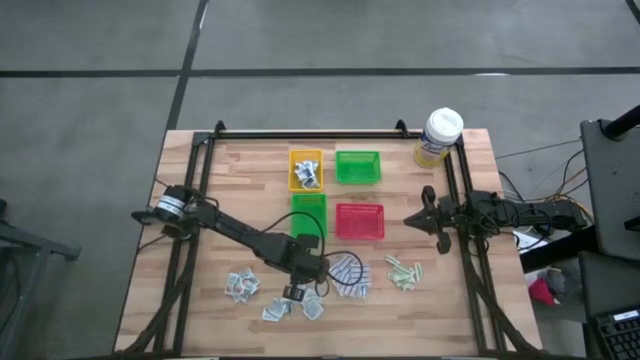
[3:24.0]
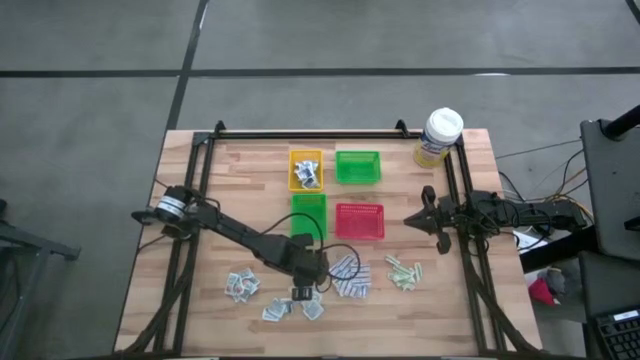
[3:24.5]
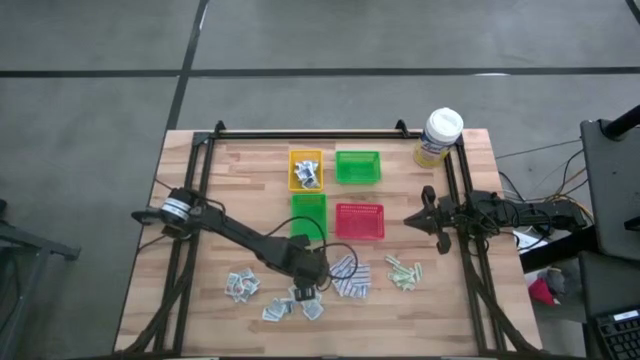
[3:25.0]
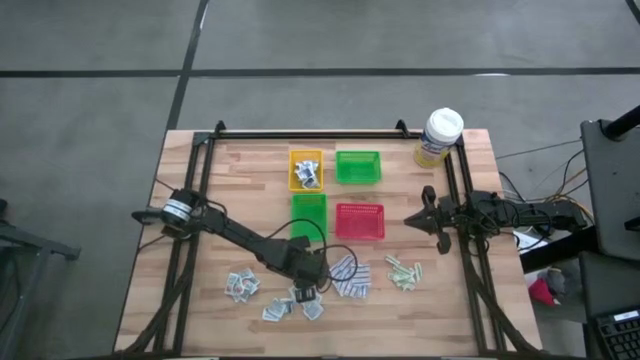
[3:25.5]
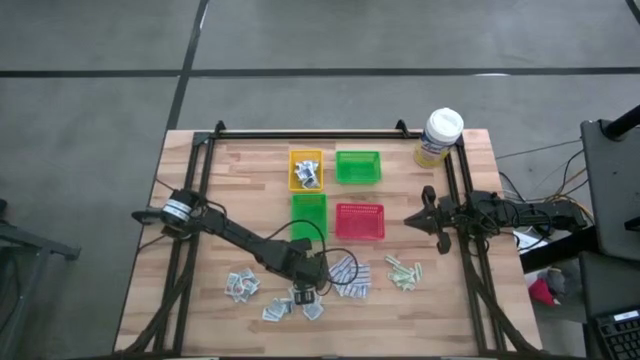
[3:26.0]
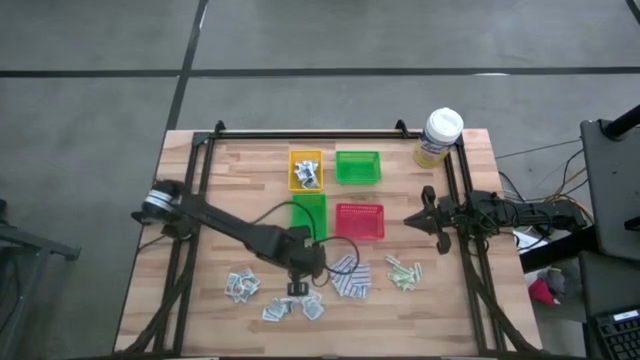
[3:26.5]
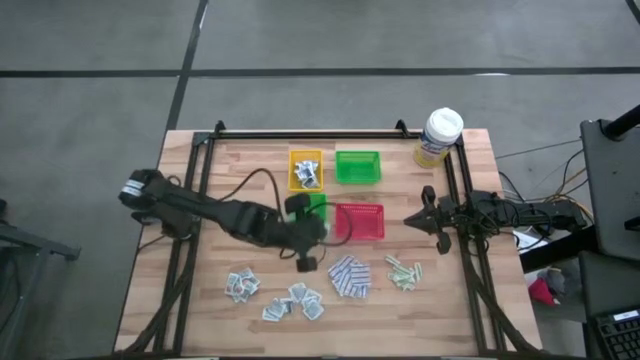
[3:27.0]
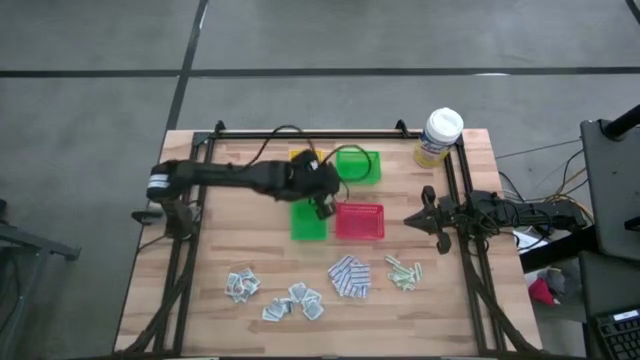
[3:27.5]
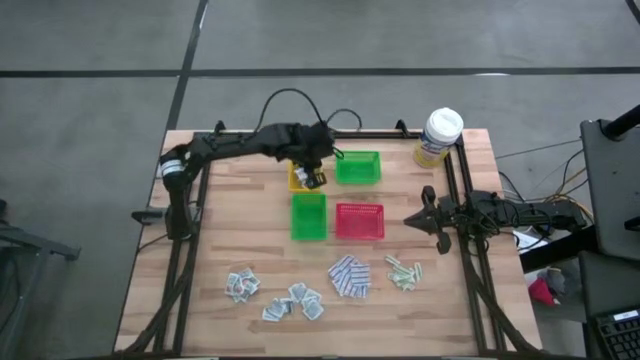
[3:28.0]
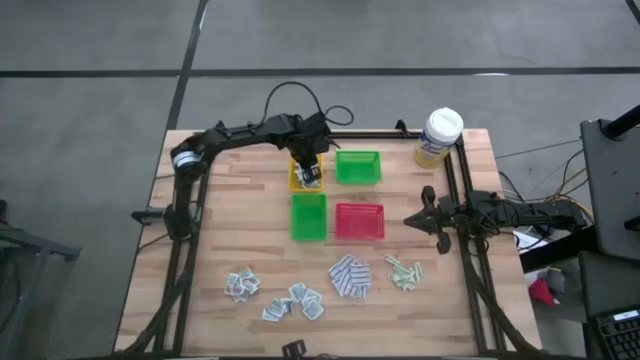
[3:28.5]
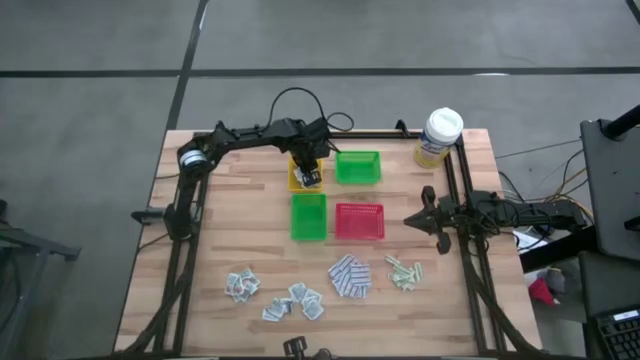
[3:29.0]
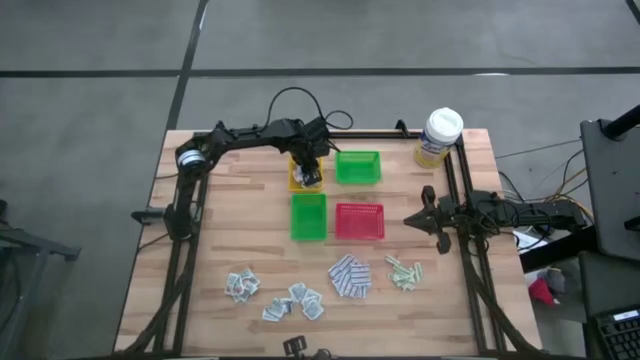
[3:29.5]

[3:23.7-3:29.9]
Task: Pick & Place First Aid Supplies
Put the blue alcohol pad into the yellow bin

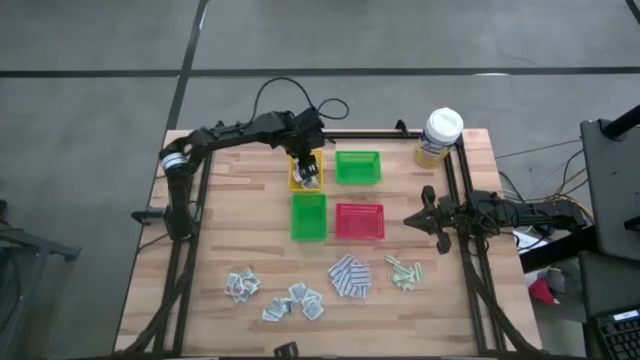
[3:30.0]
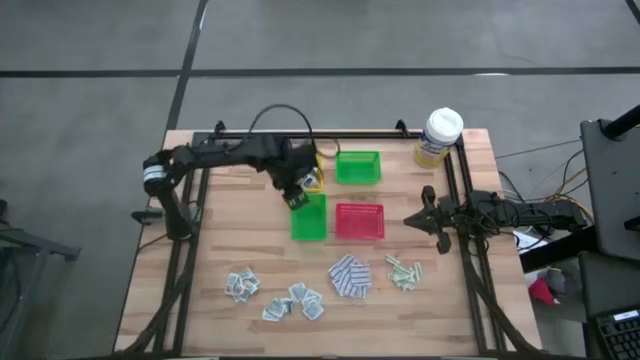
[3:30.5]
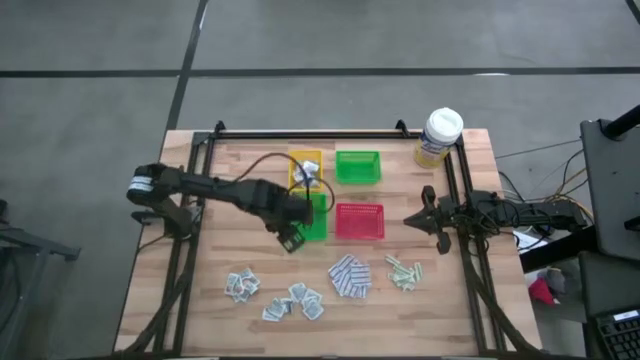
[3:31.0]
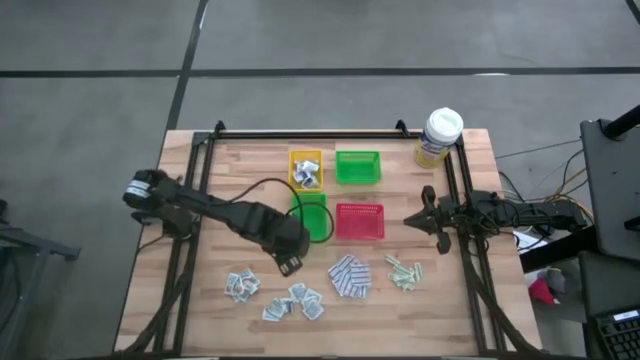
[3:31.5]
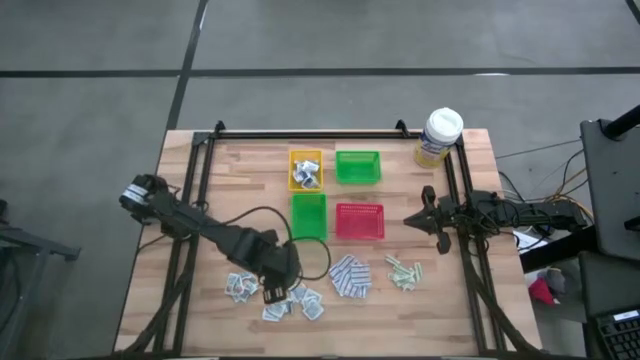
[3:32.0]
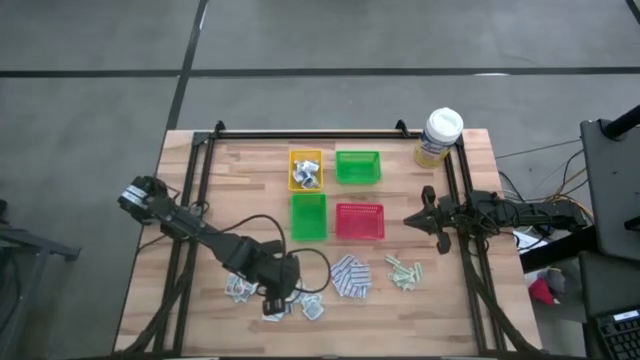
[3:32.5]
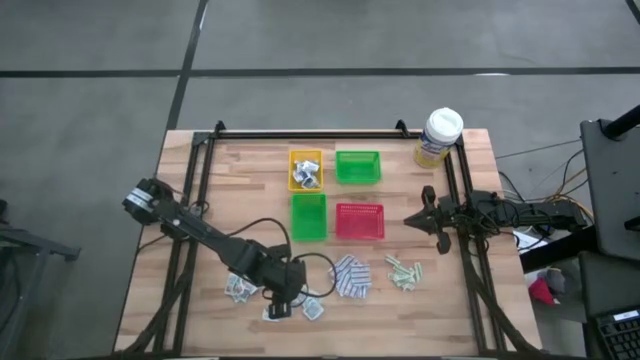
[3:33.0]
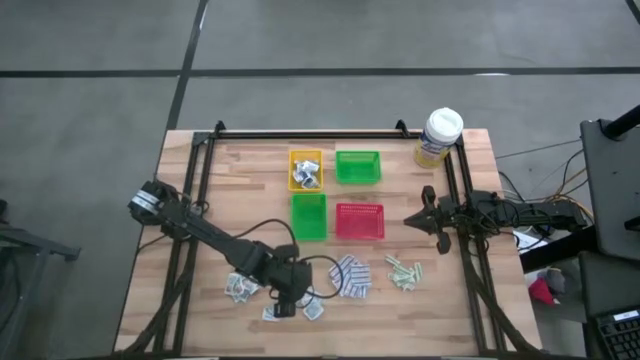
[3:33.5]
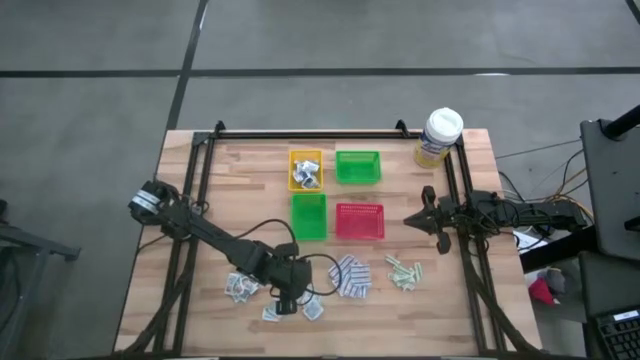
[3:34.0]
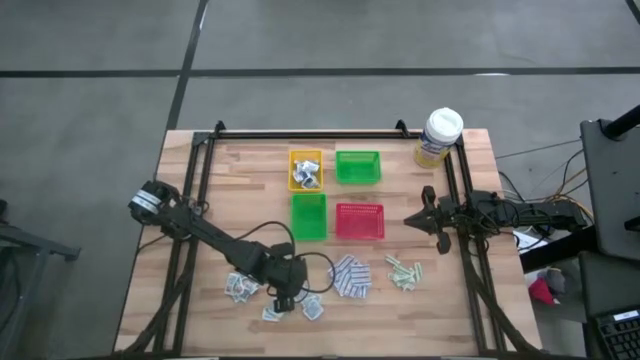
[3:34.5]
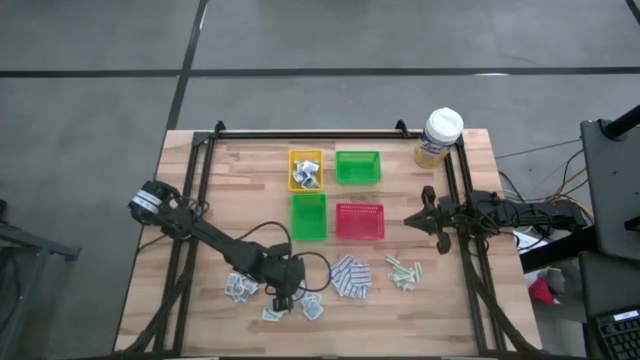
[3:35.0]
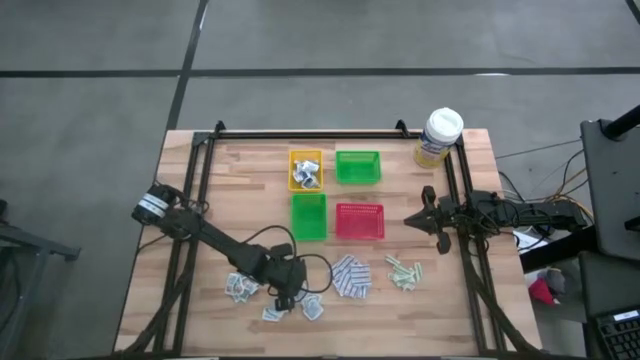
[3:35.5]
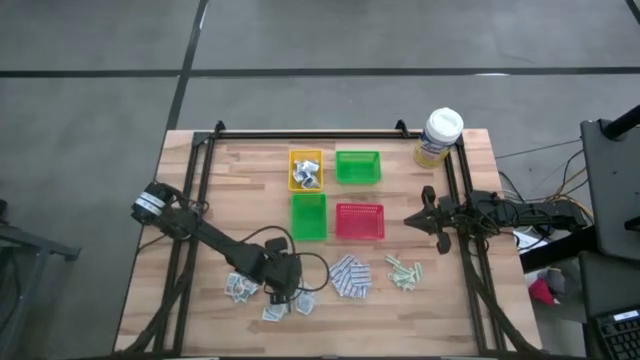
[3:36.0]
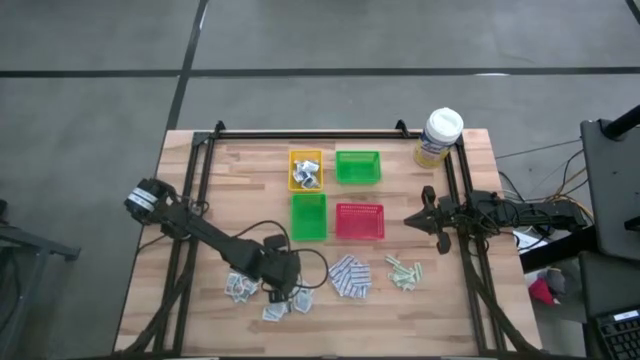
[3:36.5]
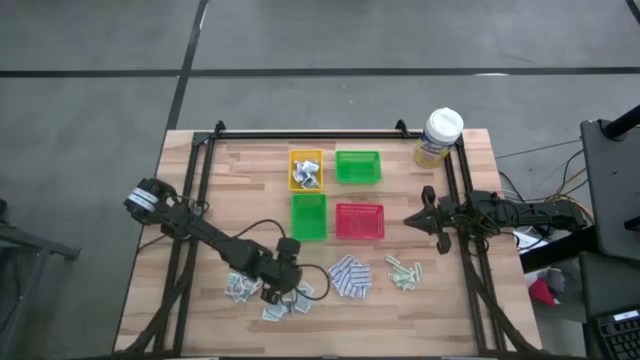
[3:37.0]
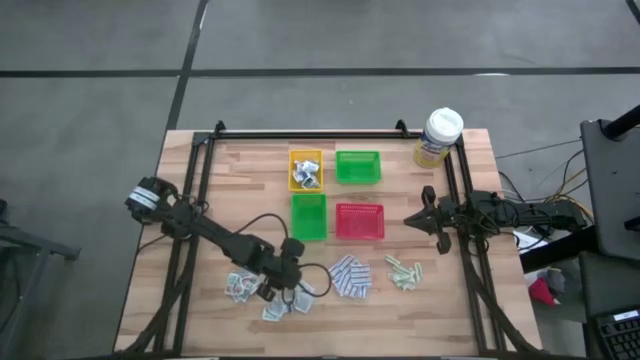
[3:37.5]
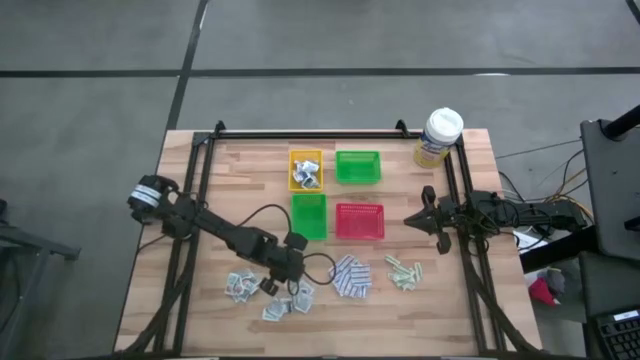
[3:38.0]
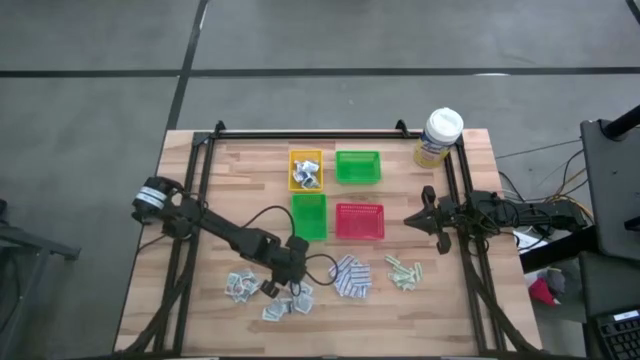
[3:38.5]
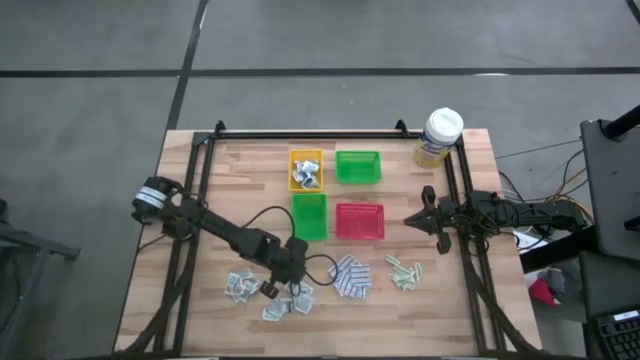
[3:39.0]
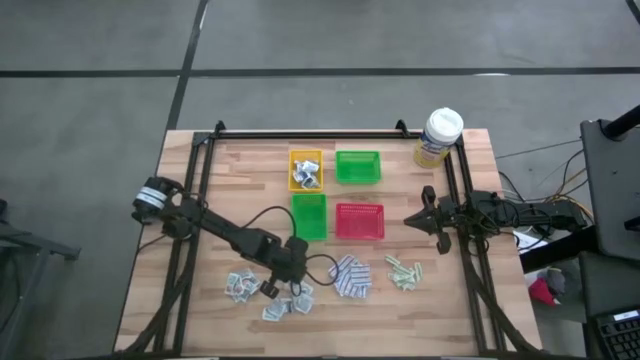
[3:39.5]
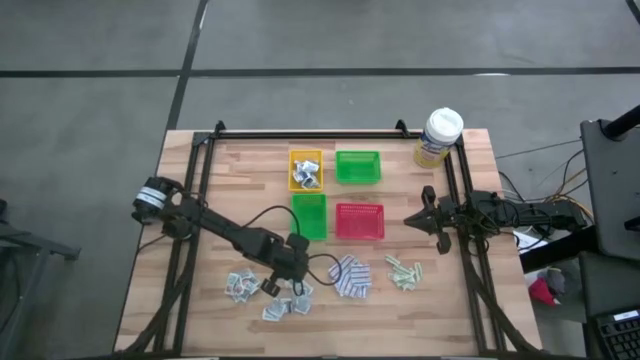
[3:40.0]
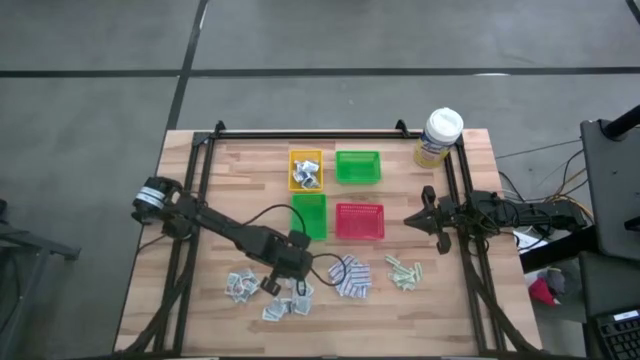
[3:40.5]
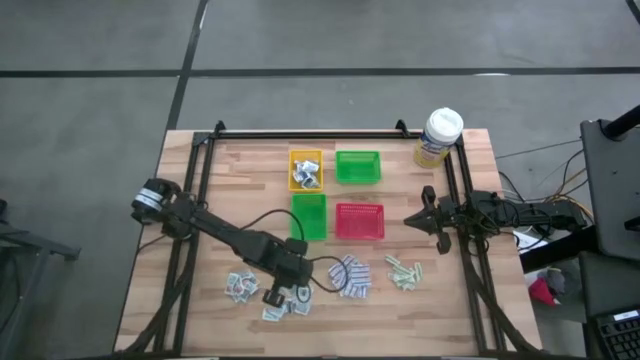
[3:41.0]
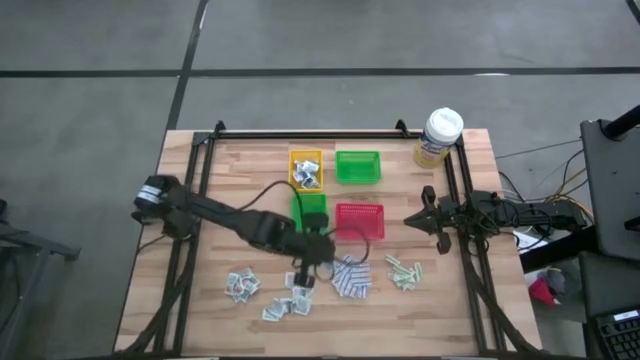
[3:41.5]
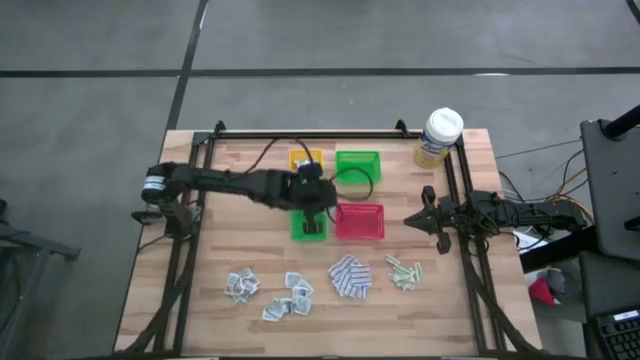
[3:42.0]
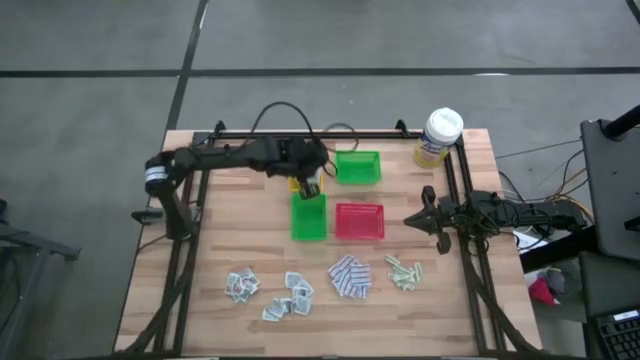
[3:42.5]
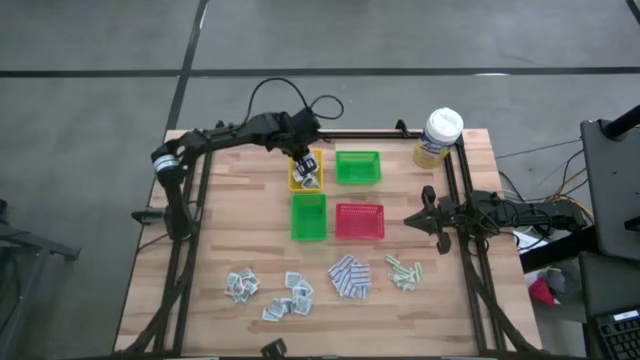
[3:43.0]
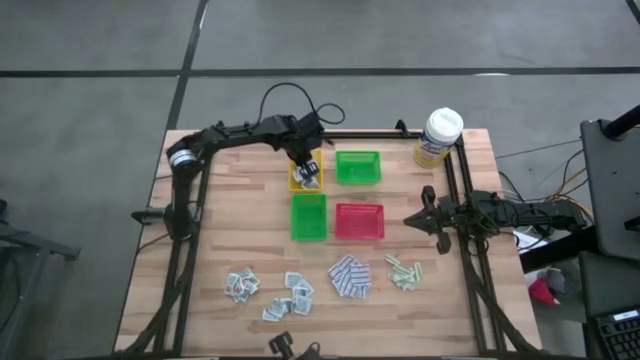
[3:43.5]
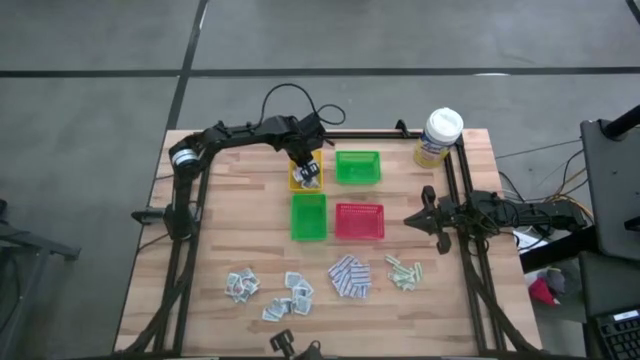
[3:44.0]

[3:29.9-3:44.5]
Put the blue alcohol pad into the yellow bin
